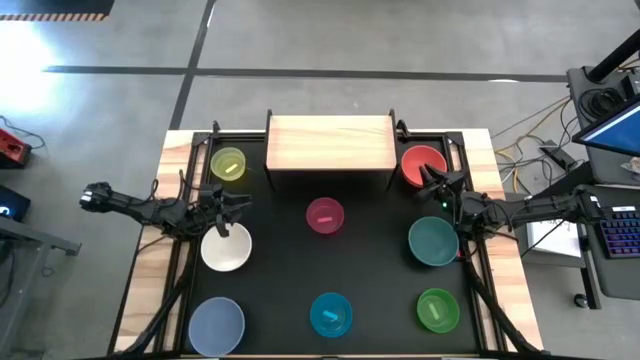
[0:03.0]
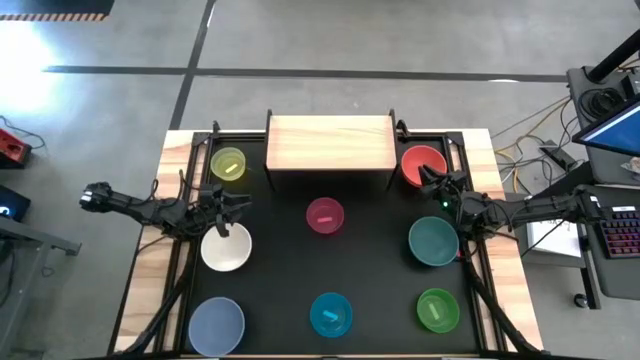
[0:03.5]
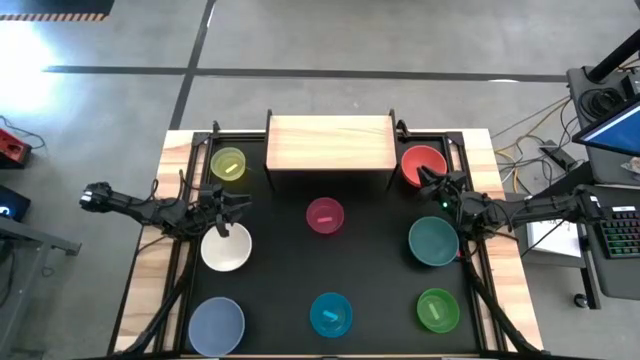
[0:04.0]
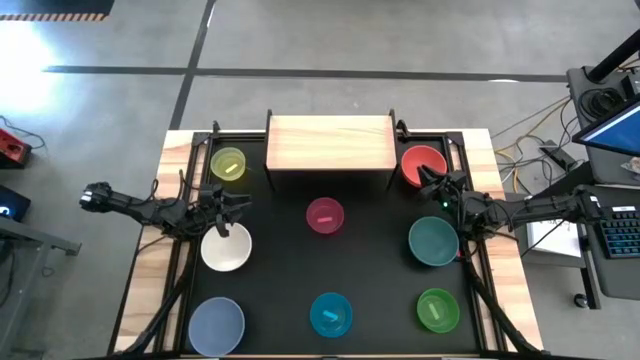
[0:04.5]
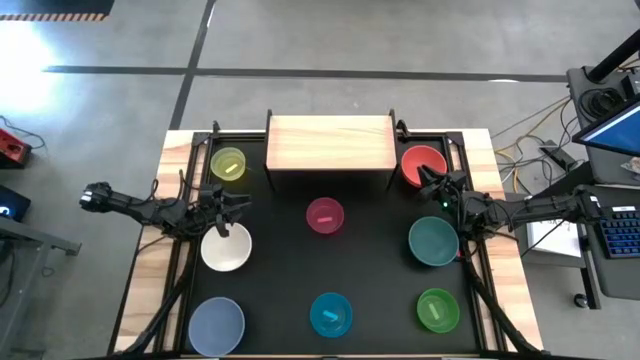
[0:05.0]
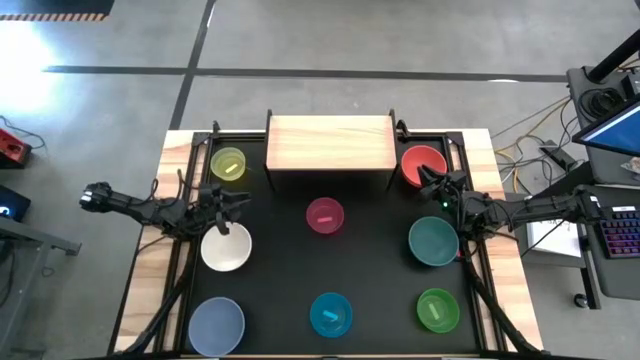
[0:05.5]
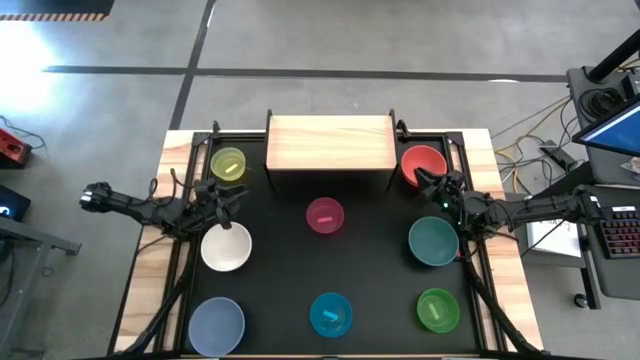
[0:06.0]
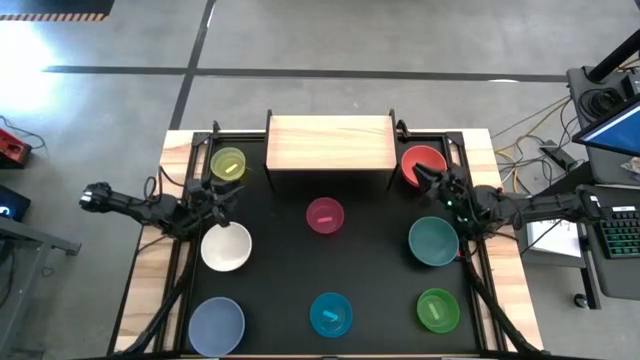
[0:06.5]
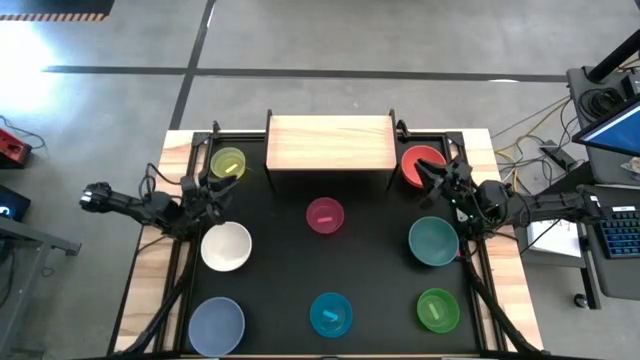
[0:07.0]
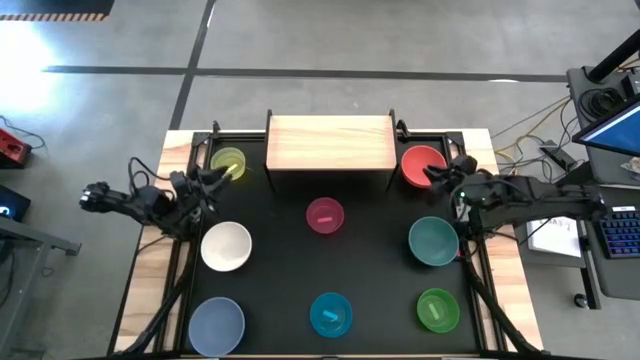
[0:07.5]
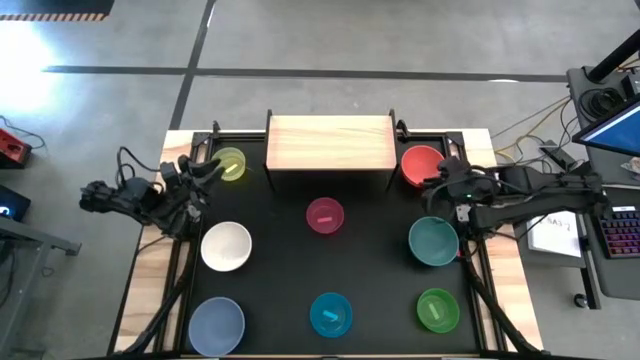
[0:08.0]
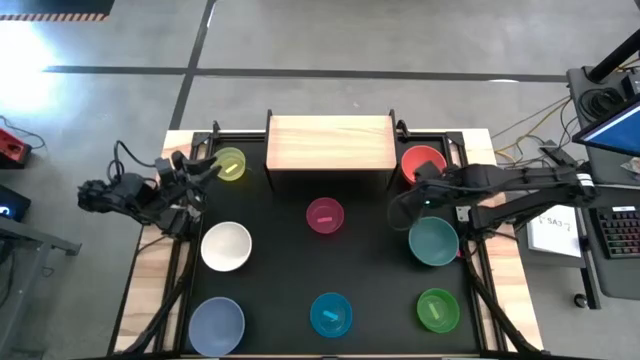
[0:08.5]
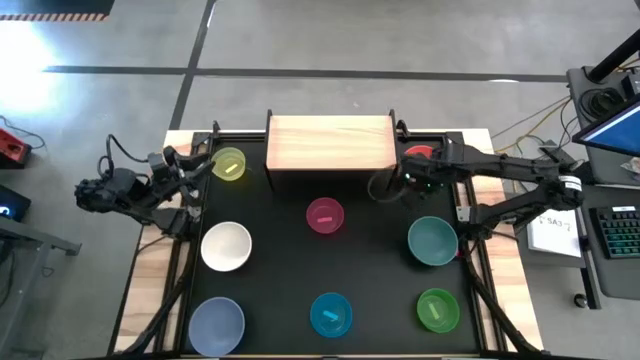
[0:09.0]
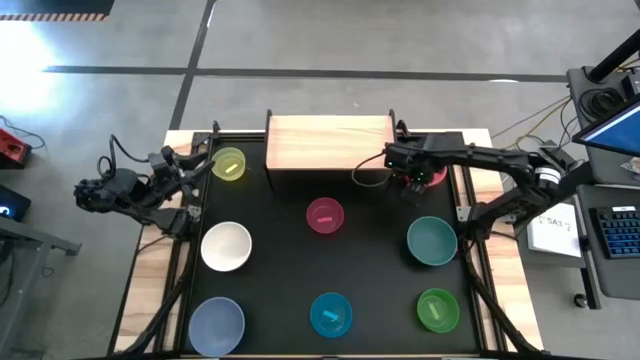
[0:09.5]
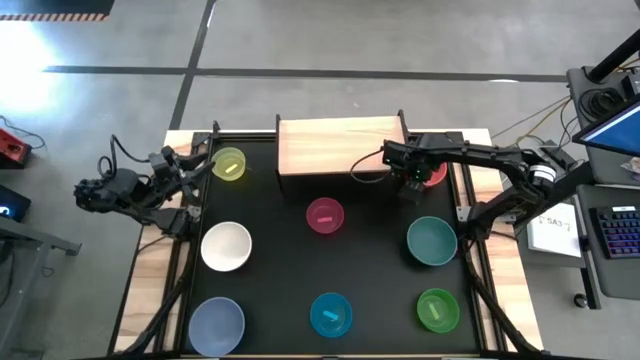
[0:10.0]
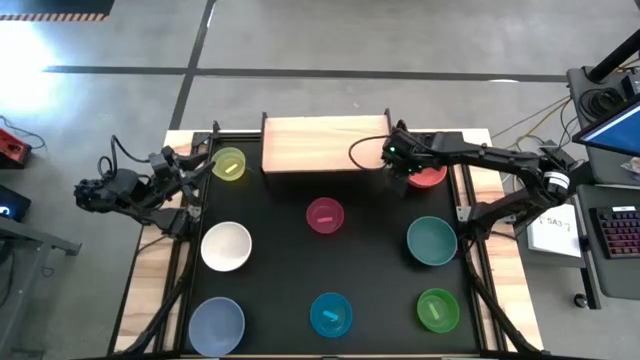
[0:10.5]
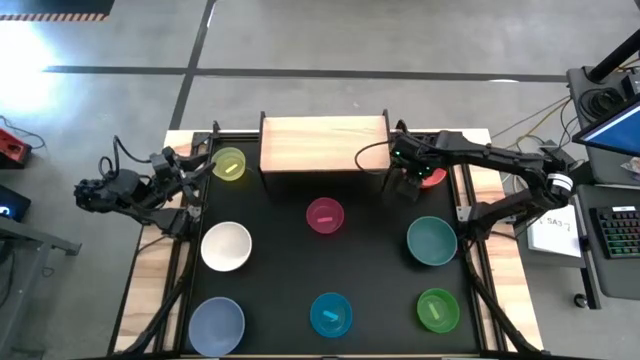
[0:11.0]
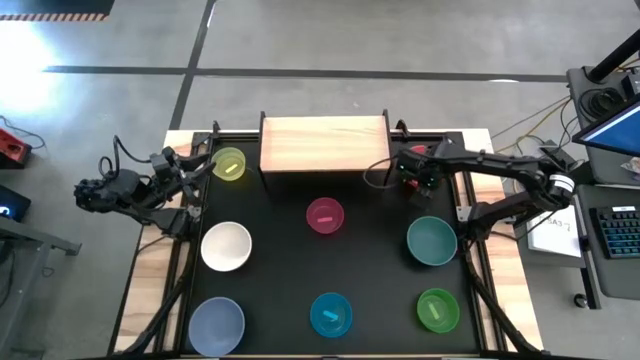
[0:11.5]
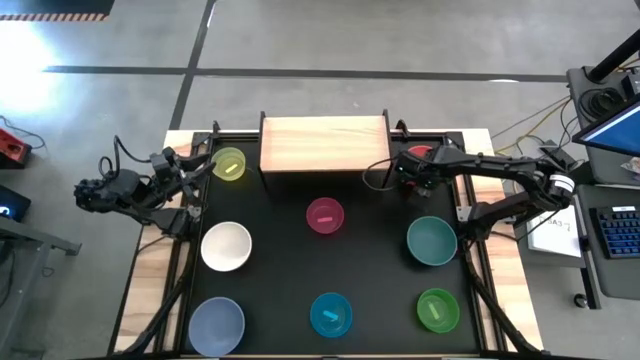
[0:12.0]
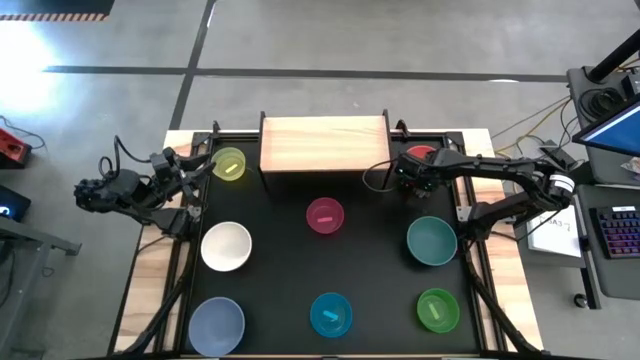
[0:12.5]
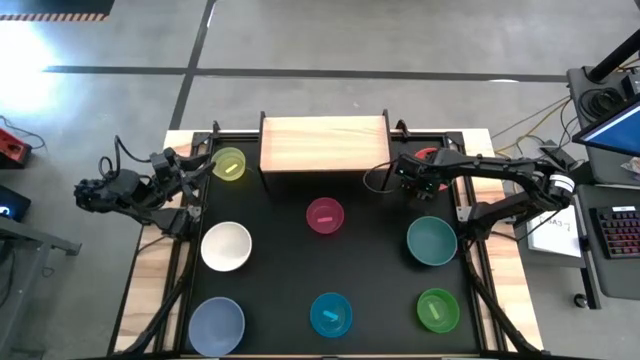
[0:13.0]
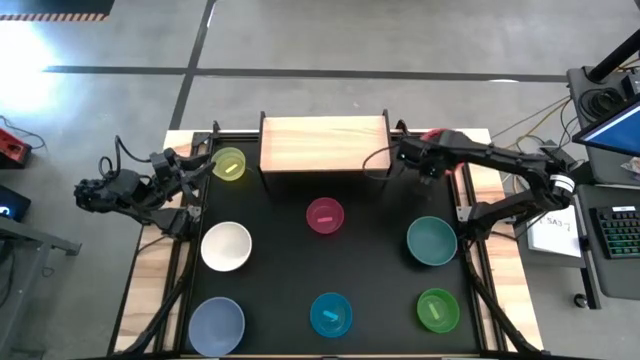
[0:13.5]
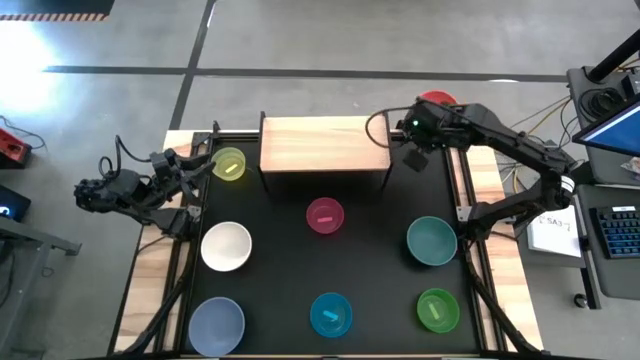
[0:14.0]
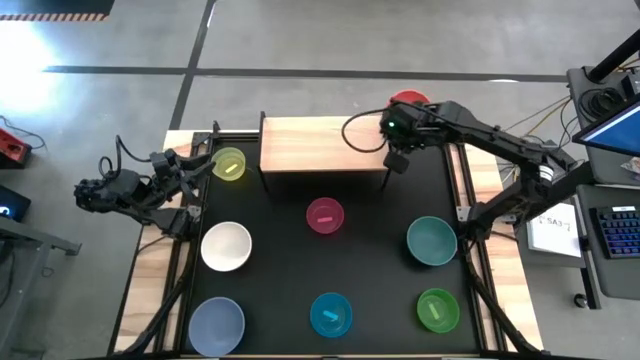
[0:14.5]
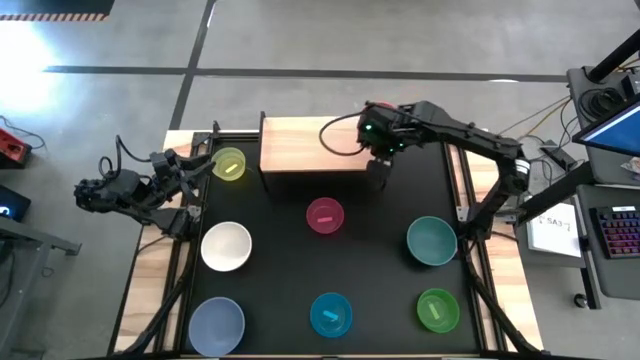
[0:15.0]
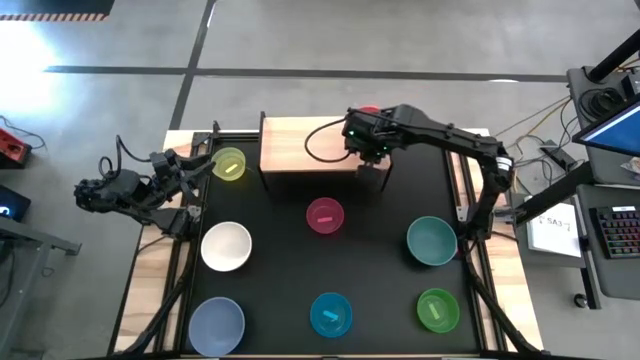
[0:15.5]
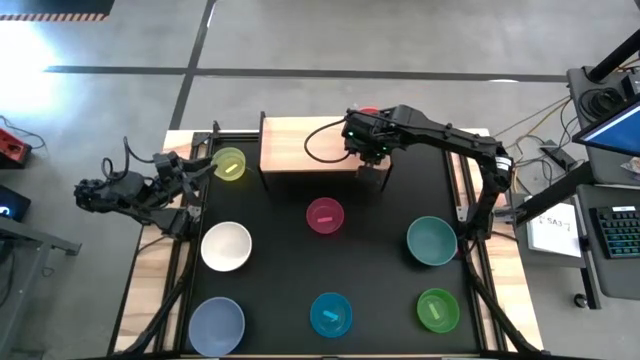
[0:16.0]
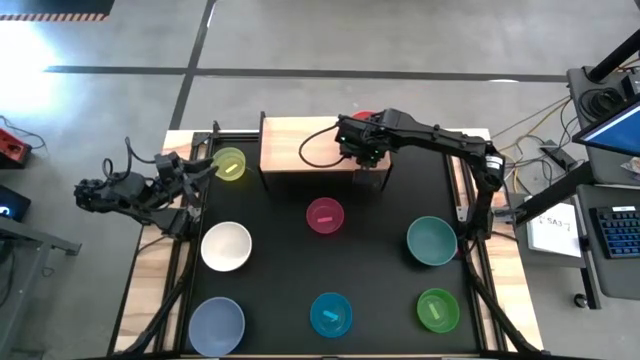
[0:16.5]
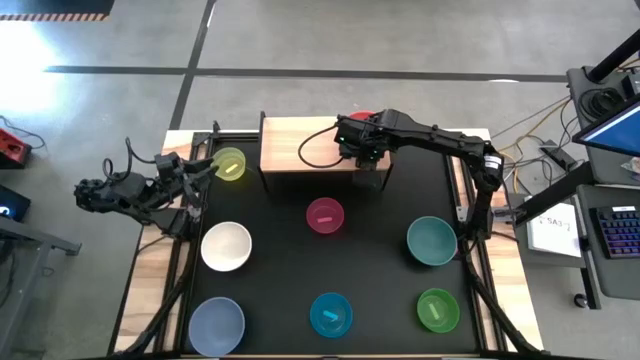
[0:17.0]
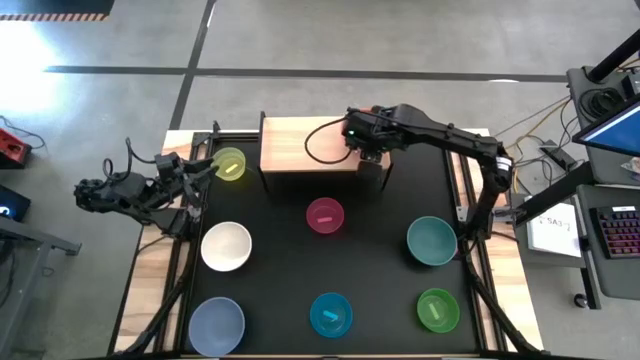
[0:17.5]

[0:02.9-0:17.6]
Task: Place and stack bowls onto a shelf
Put the orange bowl on the shelf
